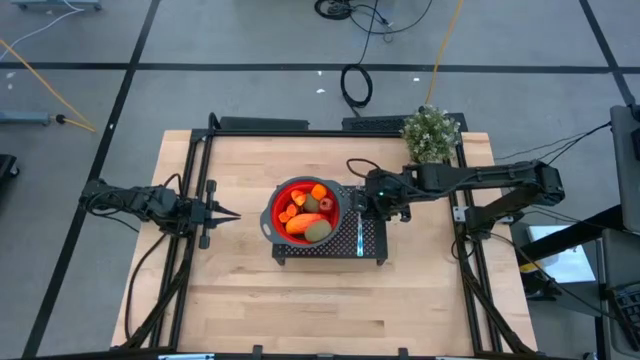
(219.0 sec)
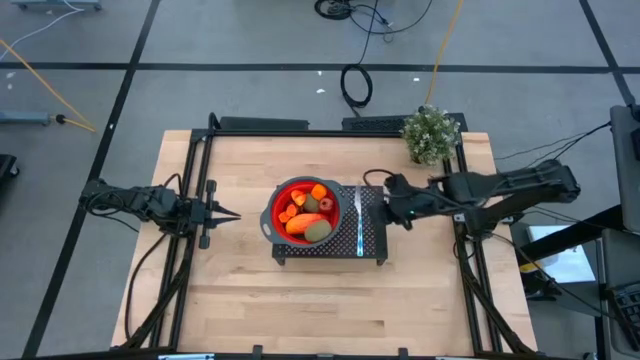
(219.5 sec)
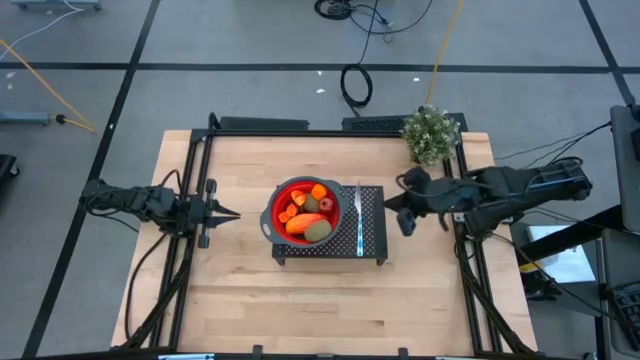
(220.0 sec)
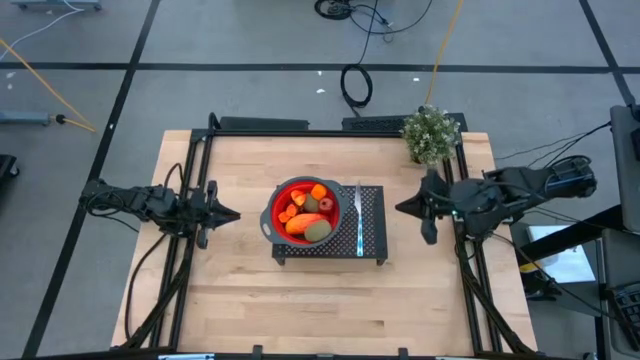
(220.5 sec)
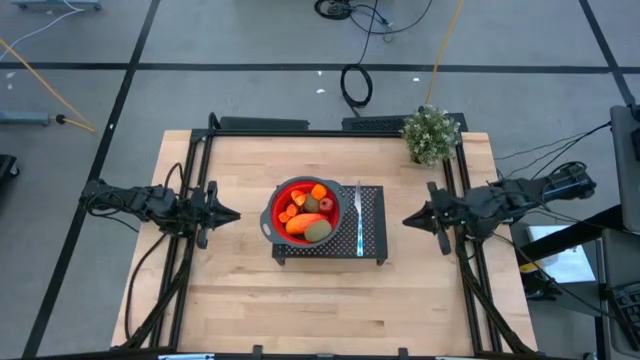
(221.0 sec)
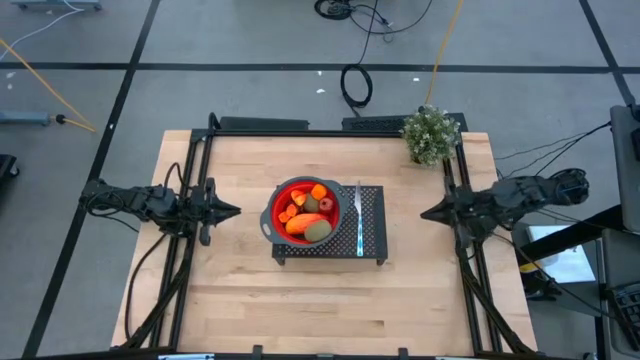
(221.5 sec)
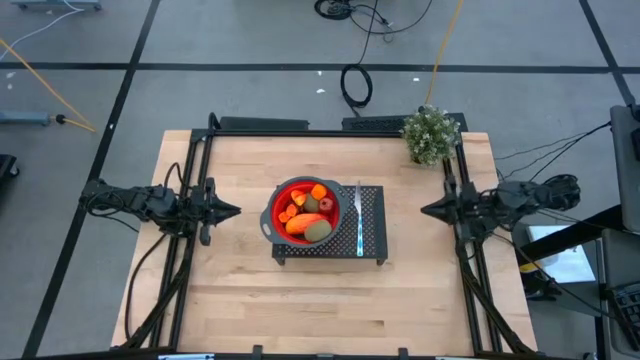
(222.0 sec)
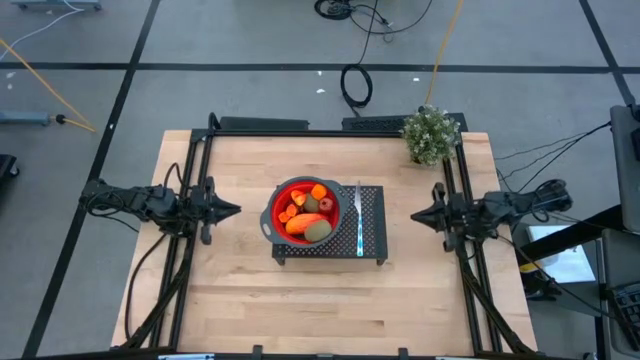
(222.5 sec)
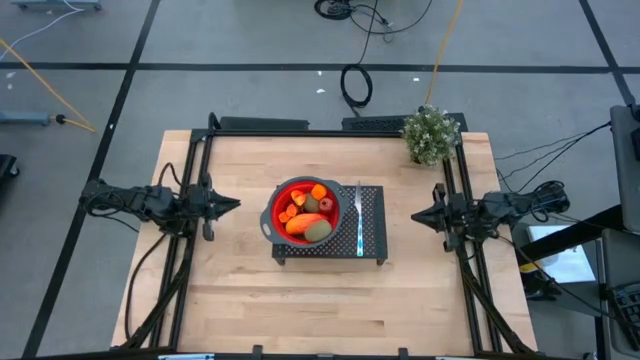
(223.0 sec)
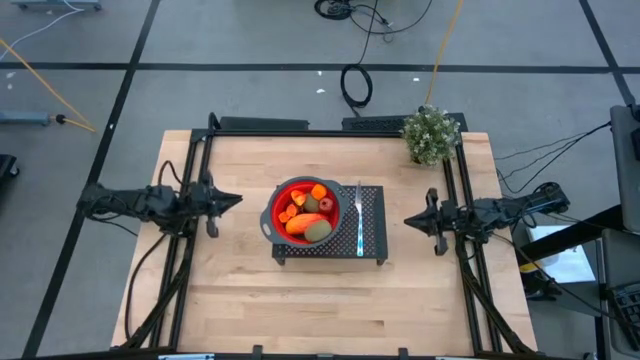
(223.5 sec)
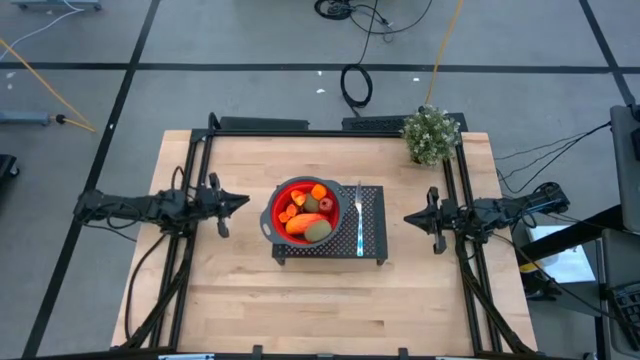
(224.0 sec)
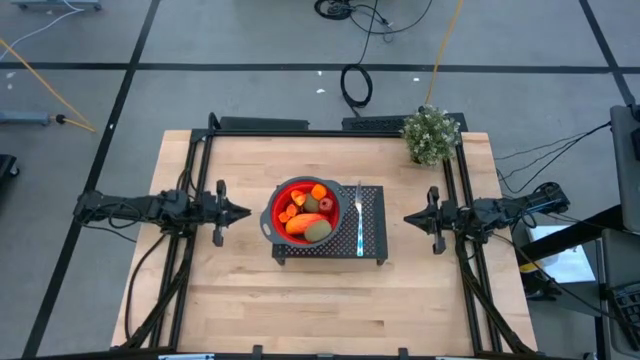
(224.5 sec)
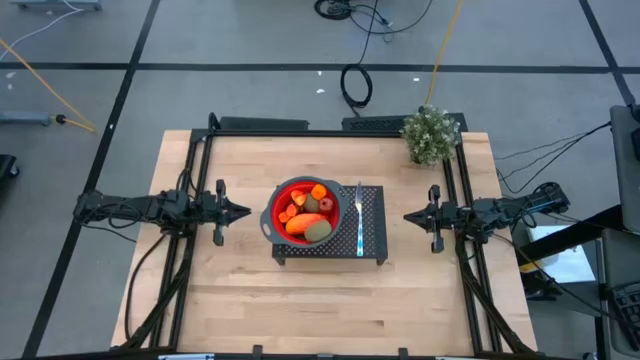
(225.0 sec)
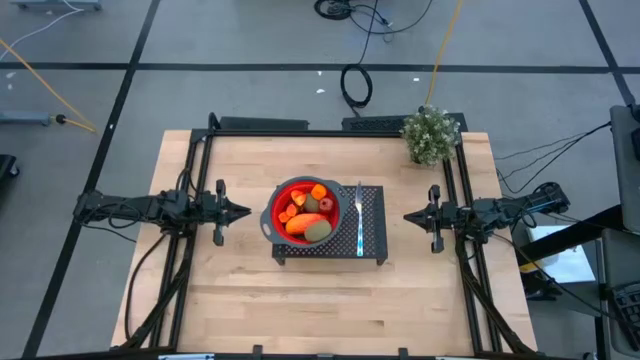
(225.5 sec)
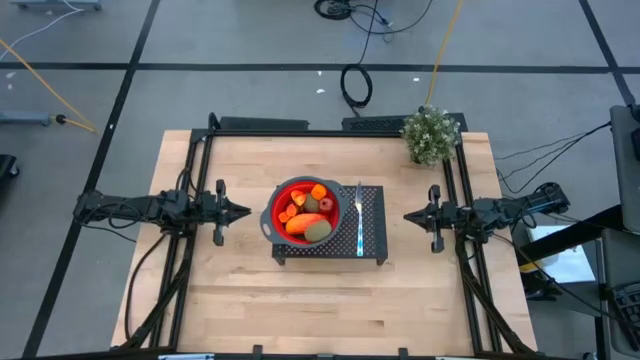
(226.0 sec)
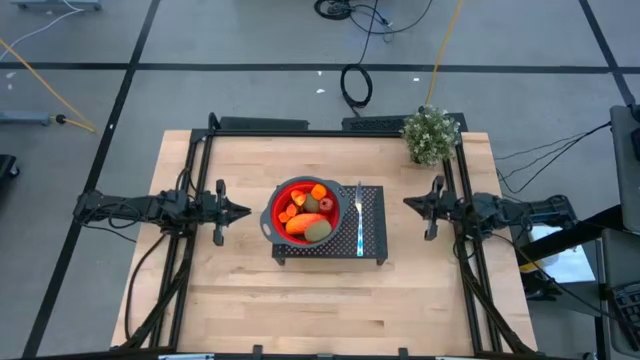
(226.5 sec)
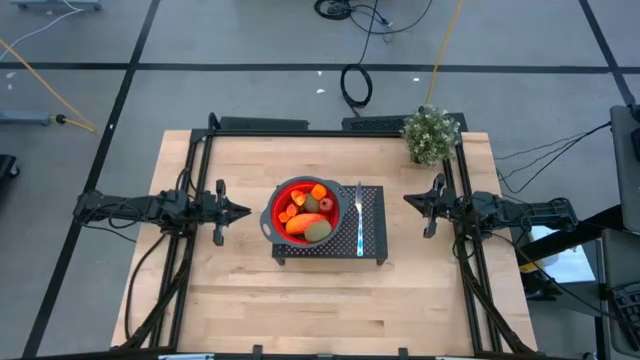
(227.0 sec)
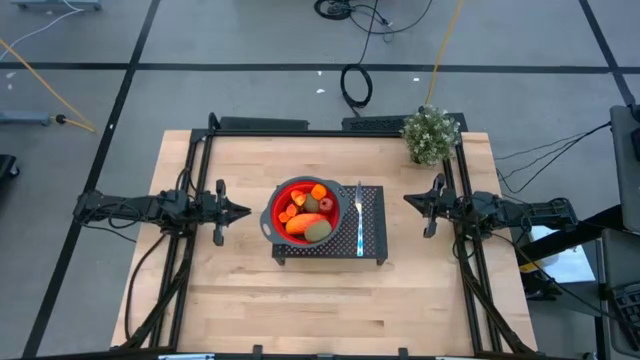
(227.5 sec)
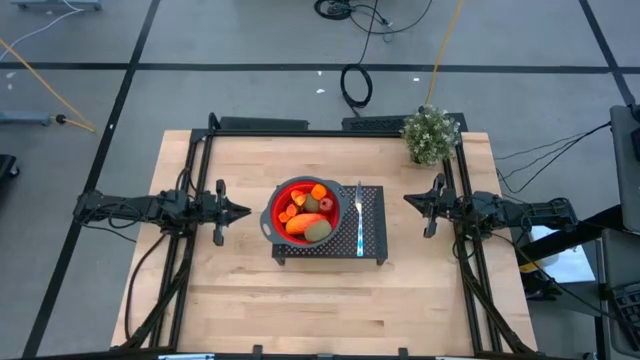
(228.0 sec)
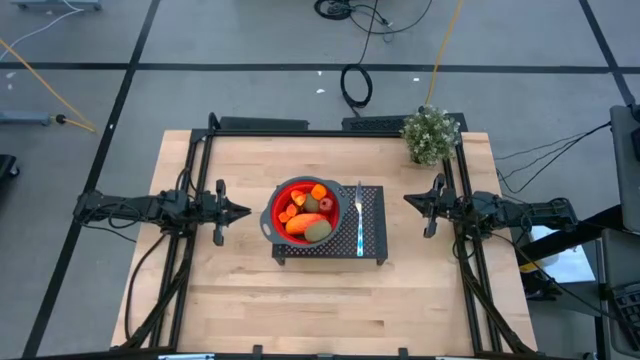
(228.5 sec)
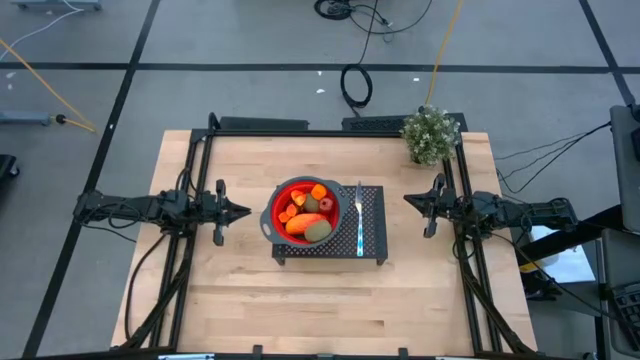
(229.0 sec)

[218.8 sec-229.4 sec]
Task: Pick & Place Fruit
Return to Home Position

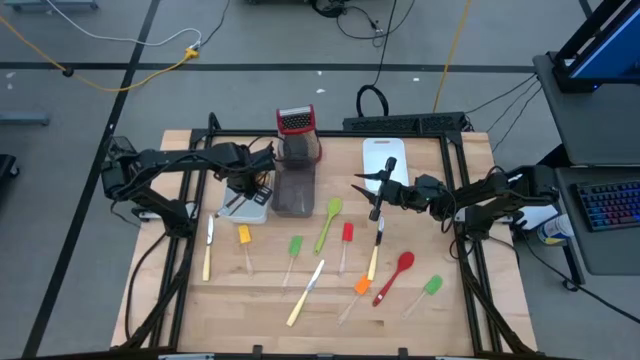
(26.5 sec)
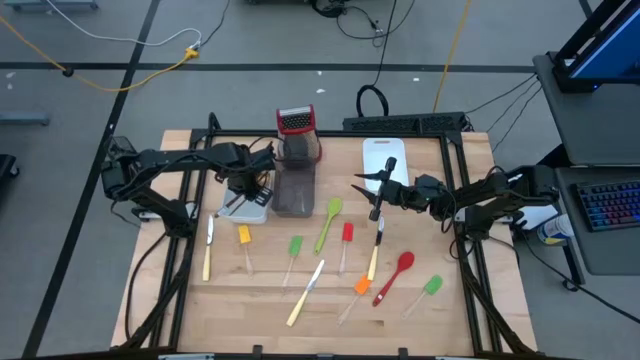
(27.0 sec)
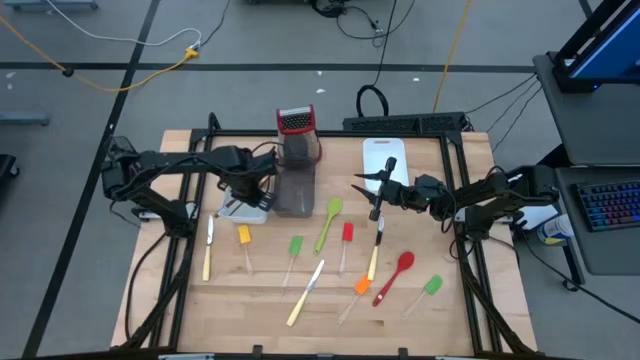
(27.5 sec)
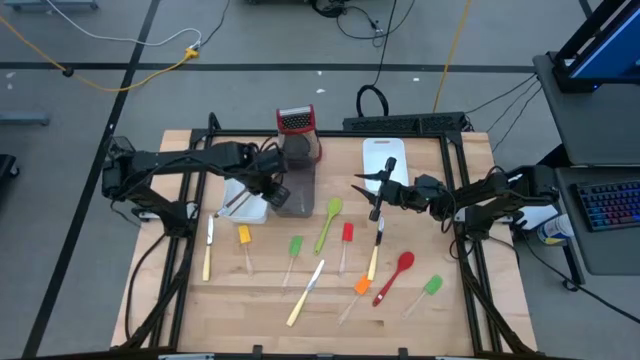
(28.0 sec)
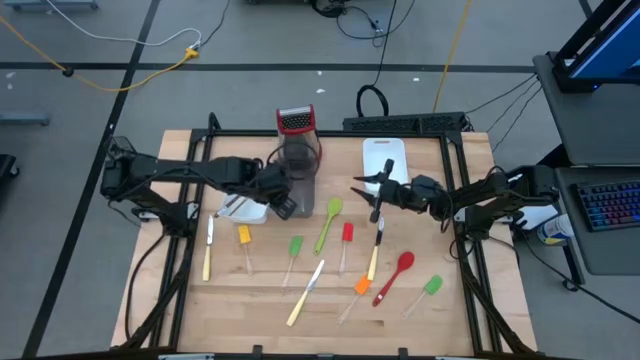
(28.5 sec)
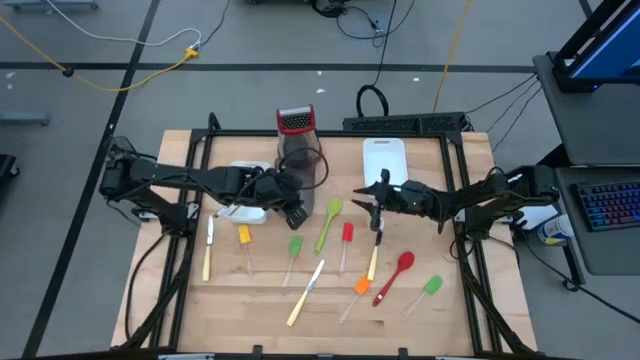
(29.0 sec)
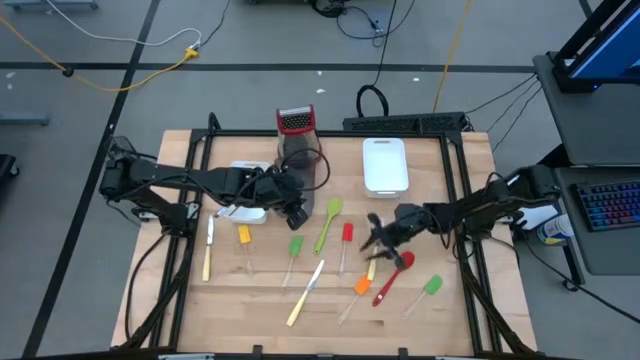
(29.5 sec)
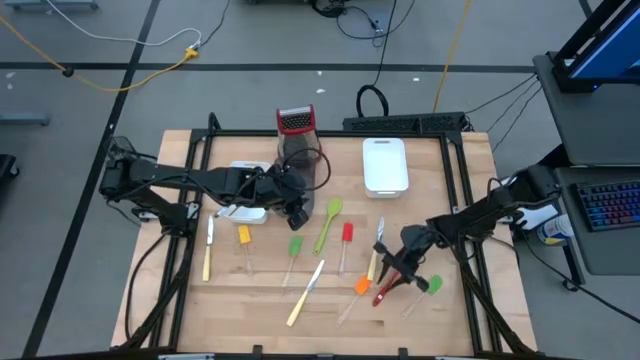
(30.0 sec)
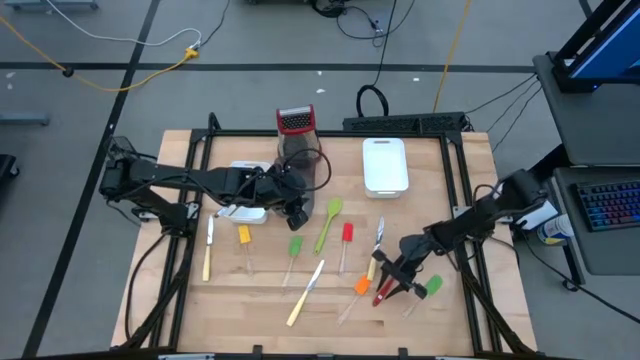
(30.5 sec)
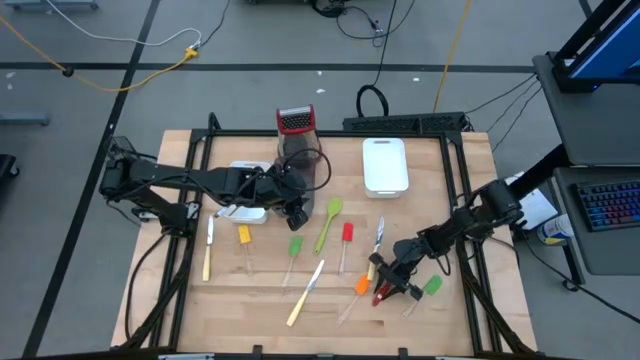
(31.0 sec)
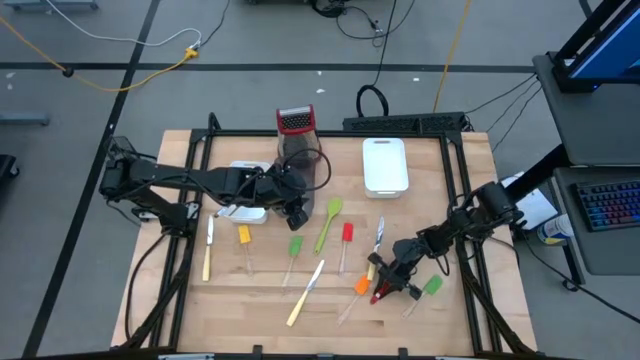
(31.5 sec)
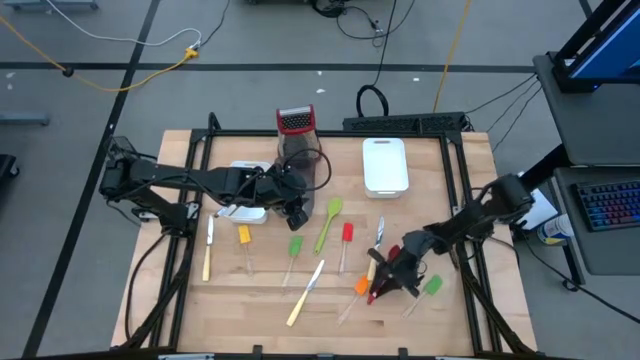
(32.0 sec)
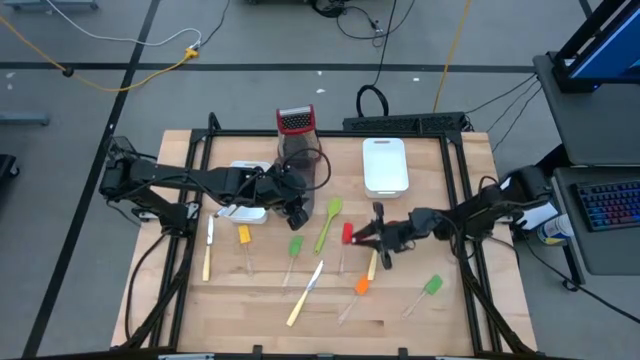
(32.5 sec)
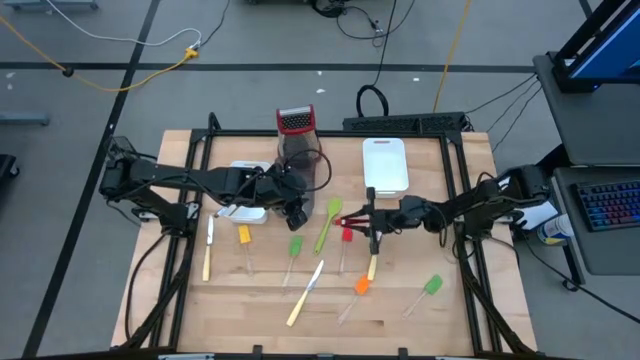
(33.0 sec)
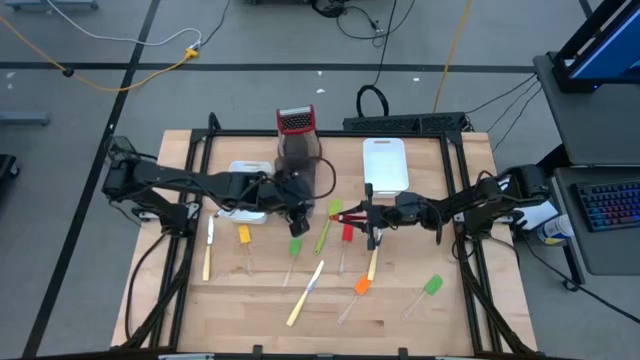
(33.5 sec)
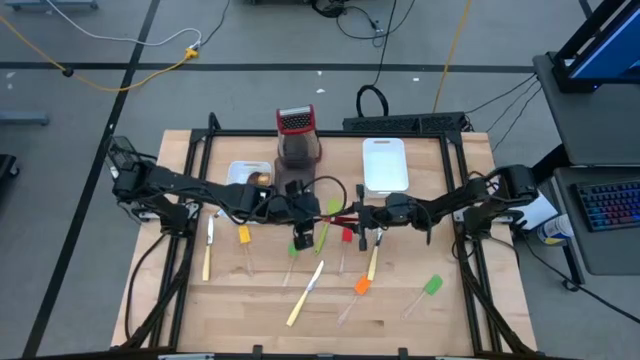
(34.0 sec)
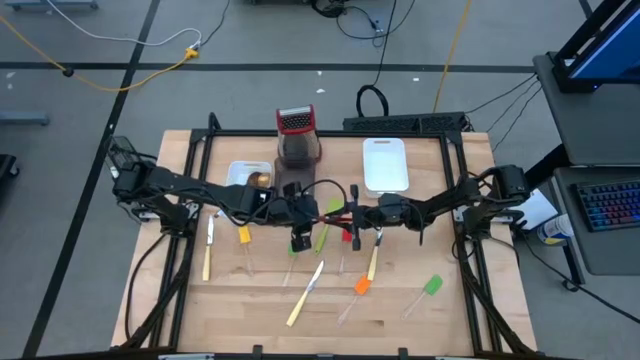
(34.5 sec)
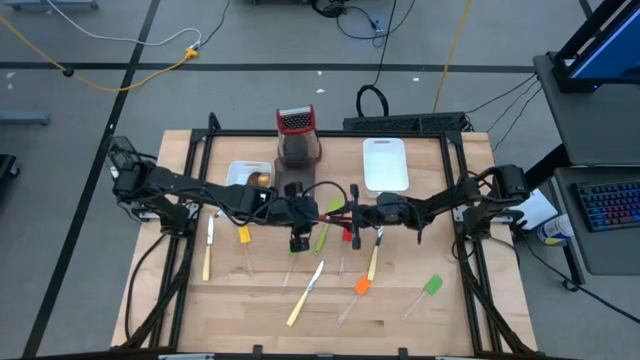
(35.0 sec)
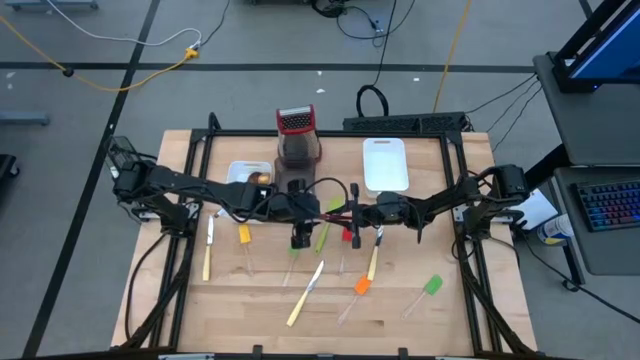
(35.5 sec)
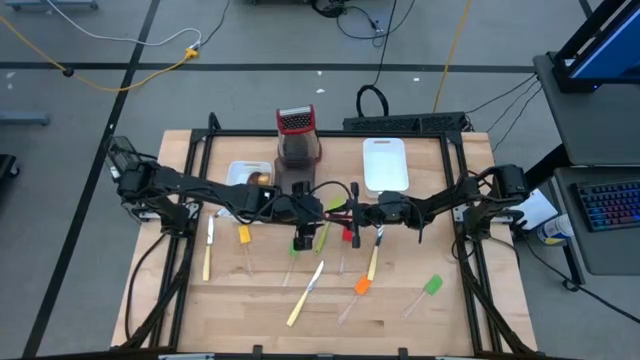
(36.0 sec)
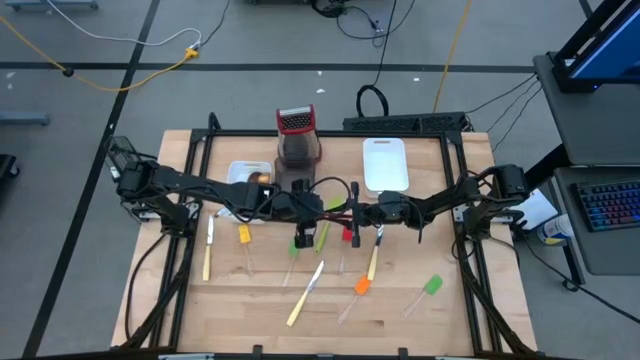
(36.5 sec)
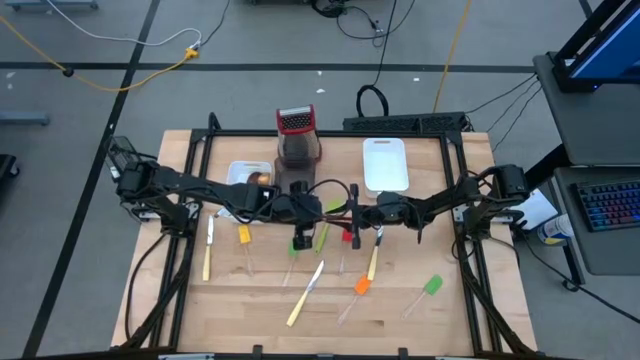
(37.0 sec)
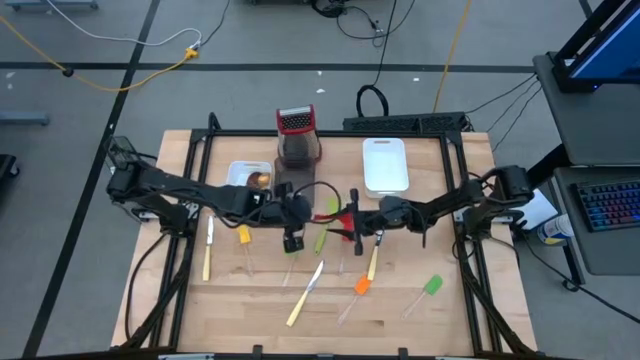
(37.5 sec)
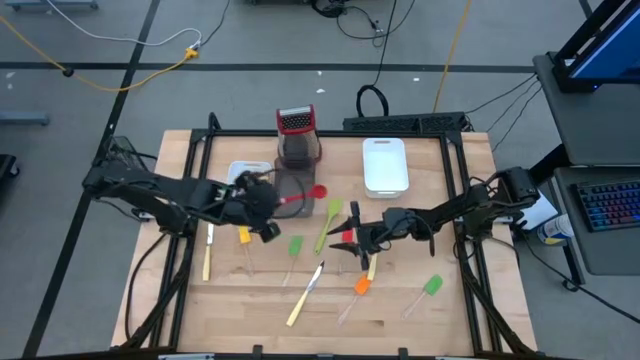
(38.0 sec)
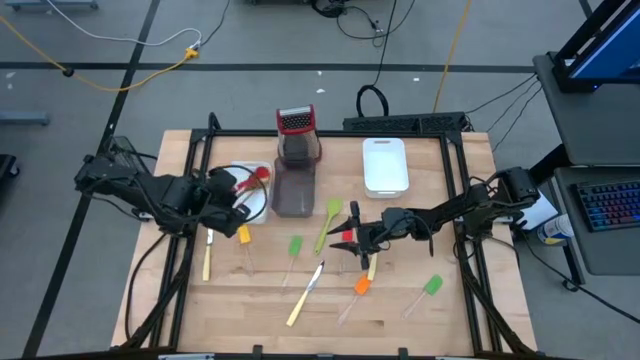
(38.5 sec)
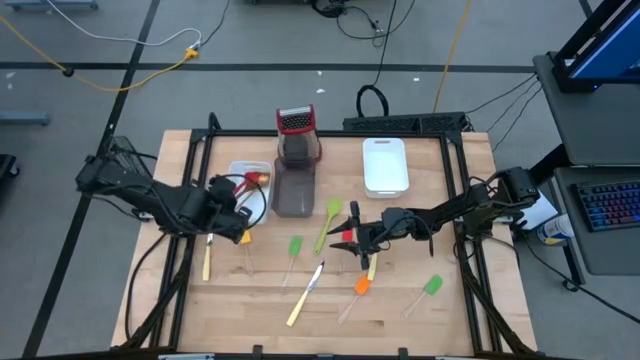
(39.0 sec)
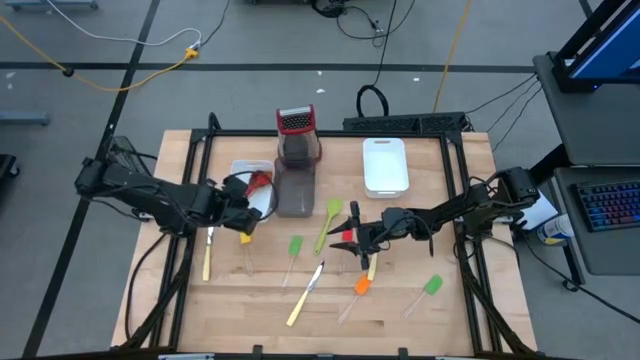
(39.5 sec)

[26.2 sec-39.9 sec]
Task: Pick & Place Kitchen Items
Put the red serving spoon into the left white bin
